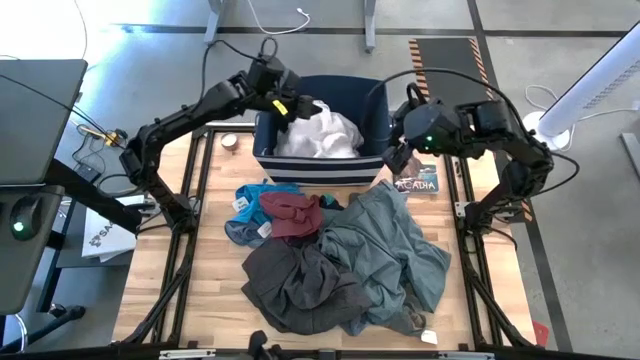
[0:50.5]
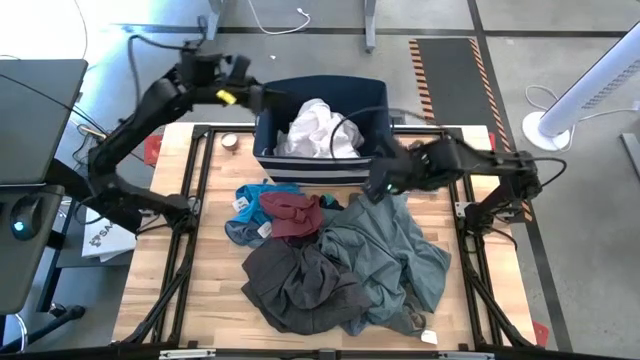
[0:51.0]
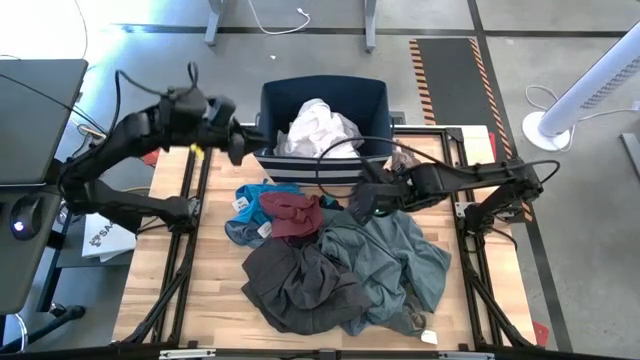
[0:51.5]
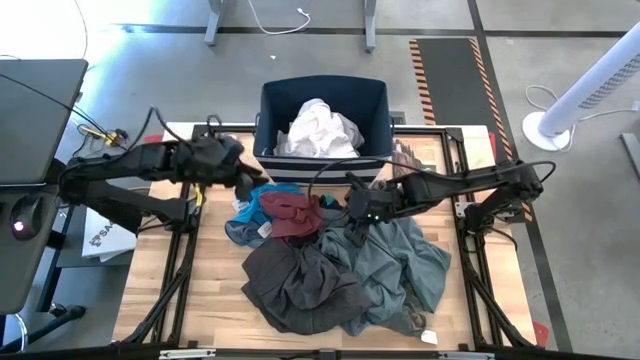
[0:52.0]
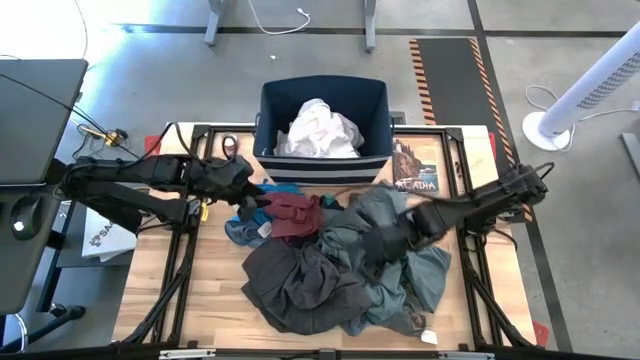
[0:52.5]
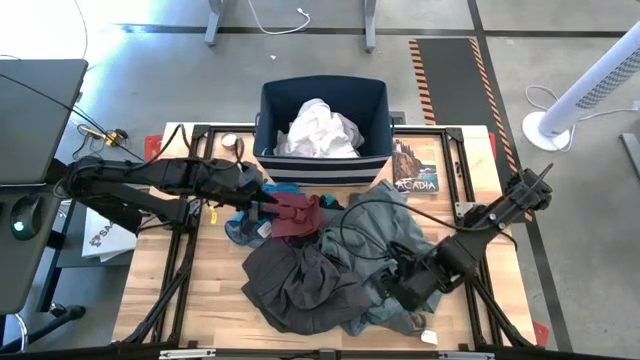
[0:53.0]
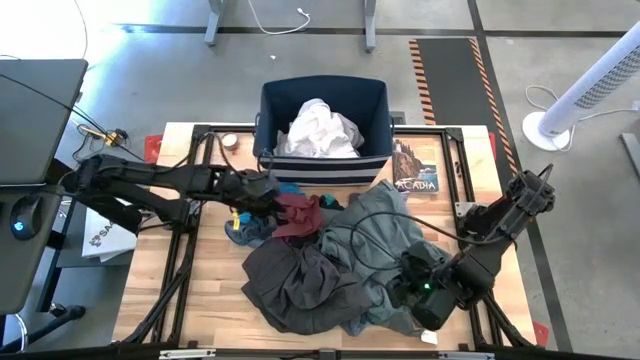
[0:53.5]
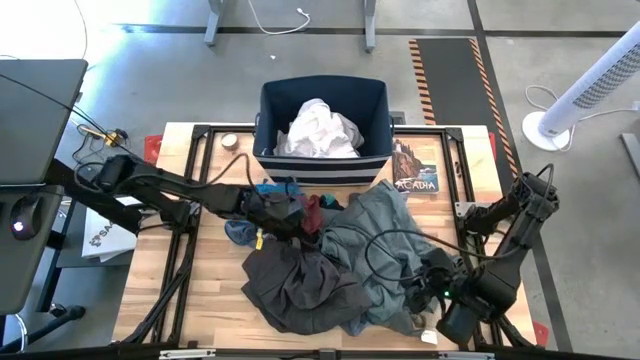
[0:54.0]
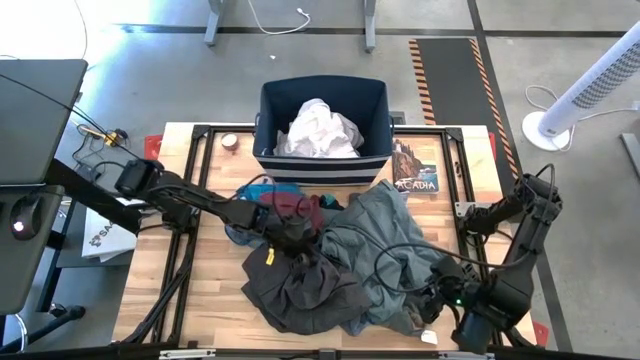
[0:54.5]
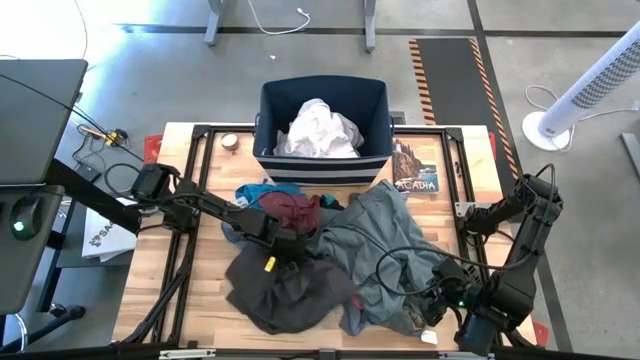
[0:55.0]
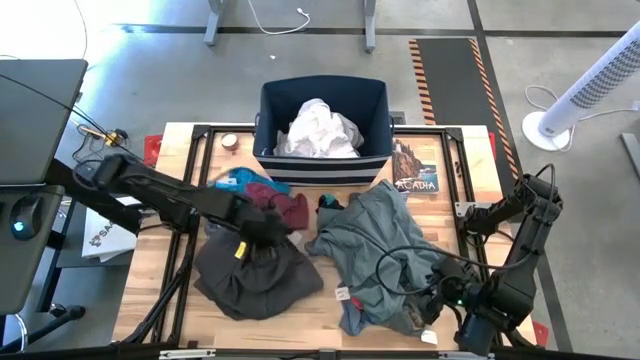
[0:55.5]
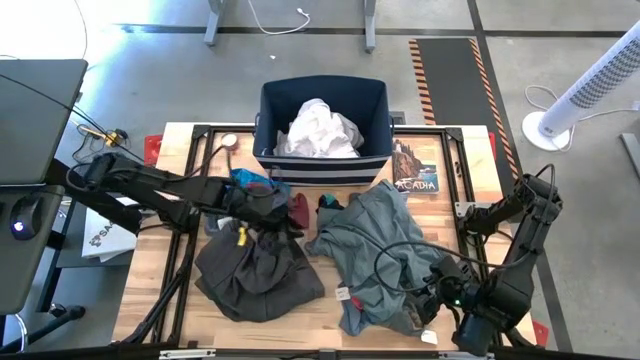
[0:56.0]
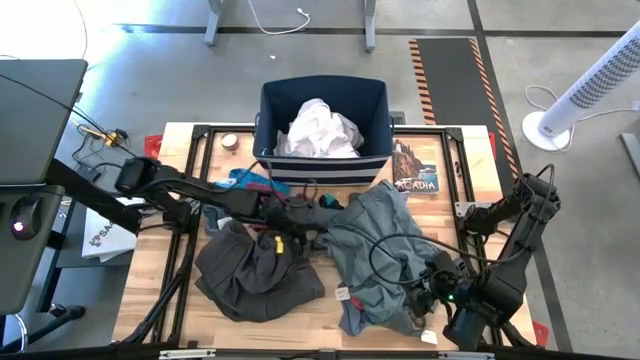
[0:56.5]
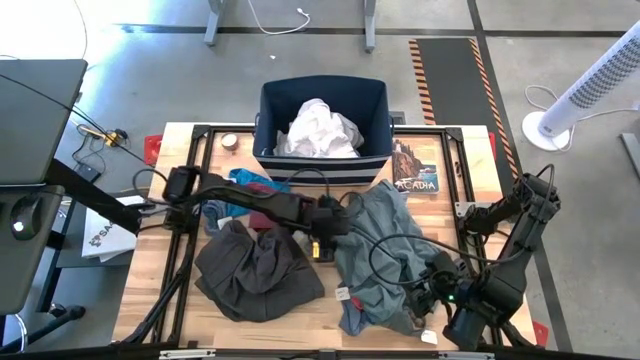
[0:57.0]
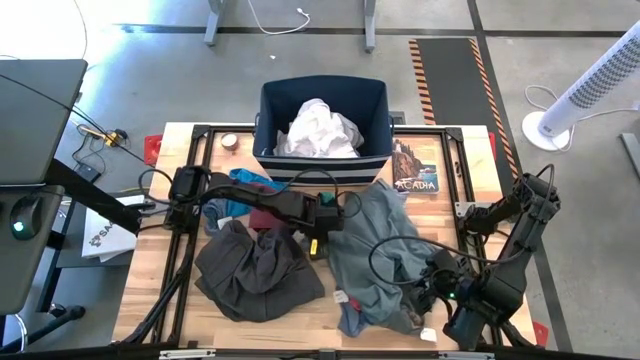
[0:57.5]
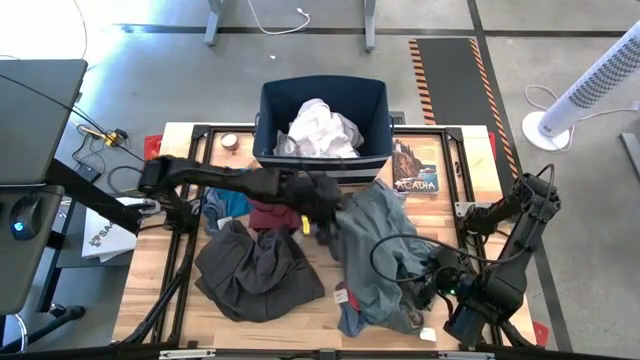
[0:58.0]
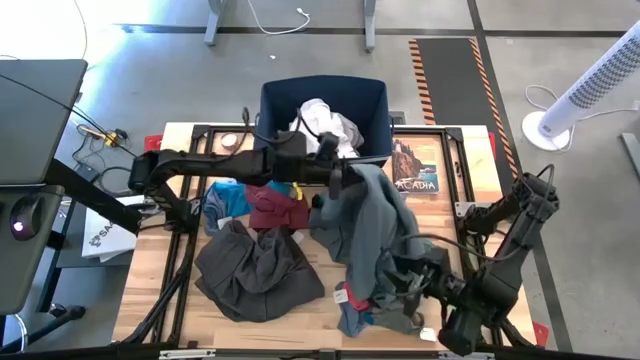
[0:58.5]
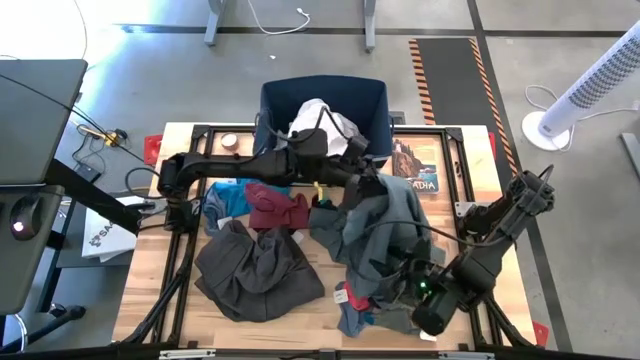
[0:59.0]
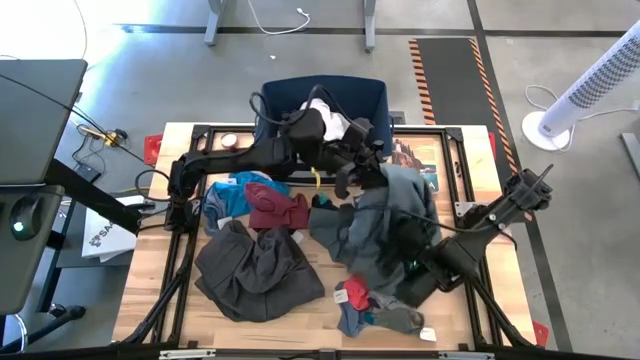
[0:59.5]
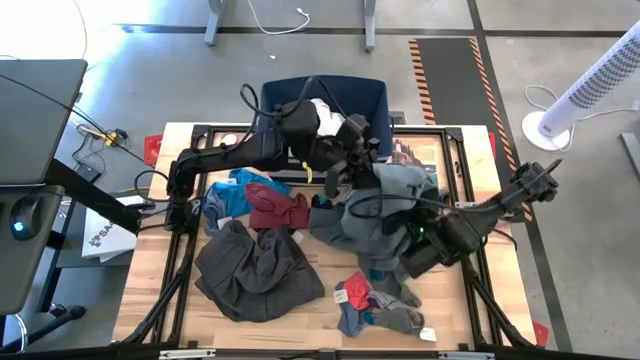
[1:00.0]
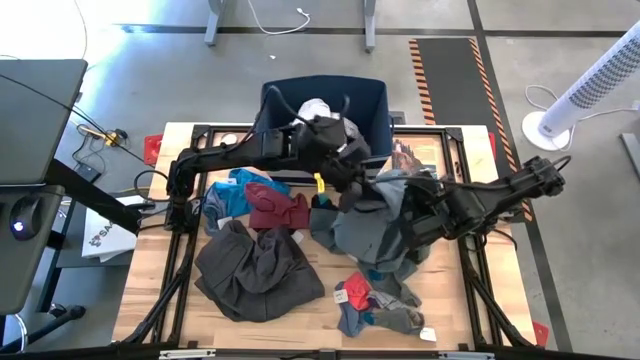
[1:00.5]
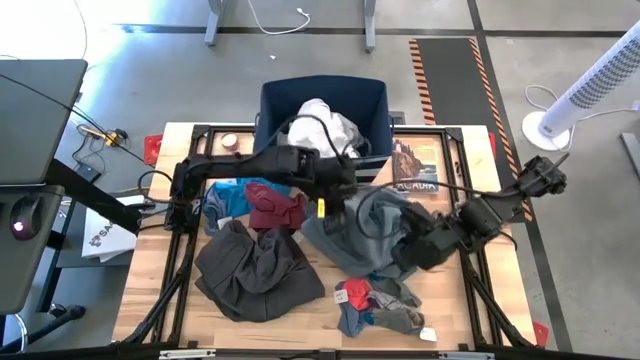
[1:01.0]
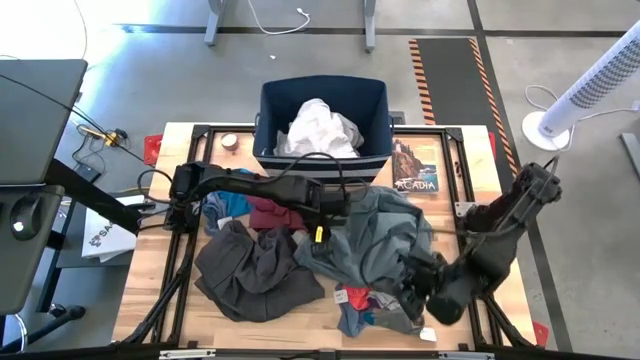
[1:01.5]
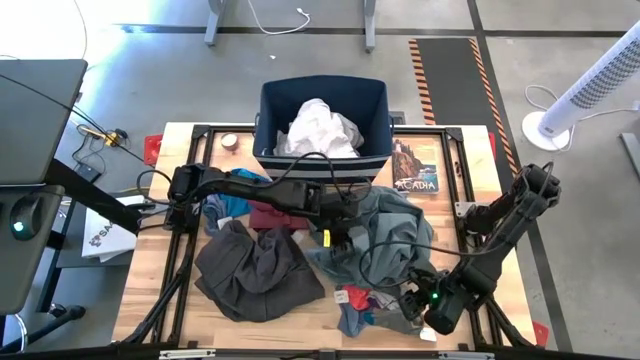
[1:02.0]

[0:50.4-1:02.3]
Task: Sort clothes
Put the grey sock into the blue laundry bin

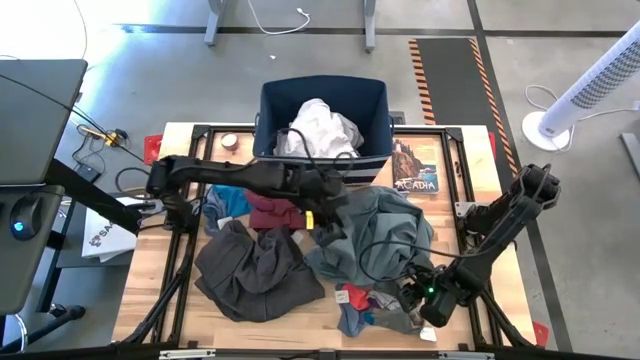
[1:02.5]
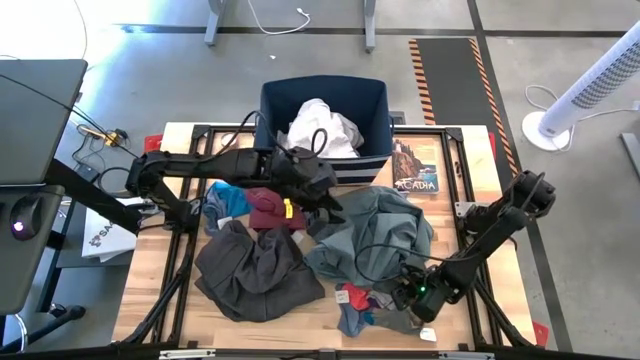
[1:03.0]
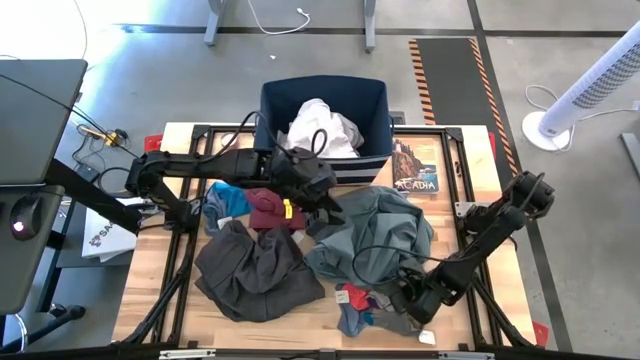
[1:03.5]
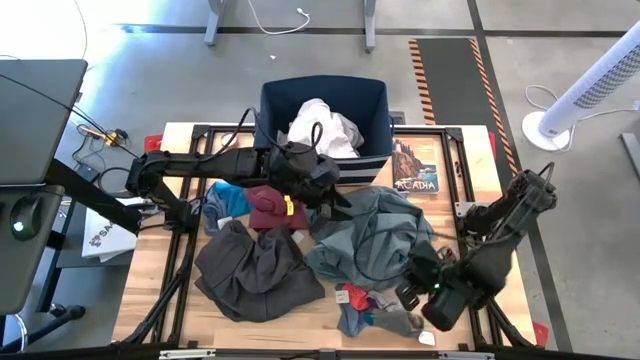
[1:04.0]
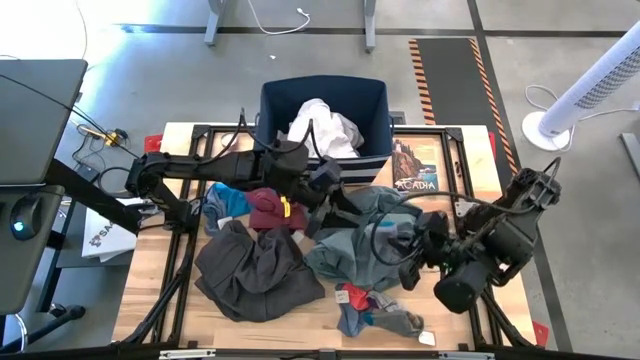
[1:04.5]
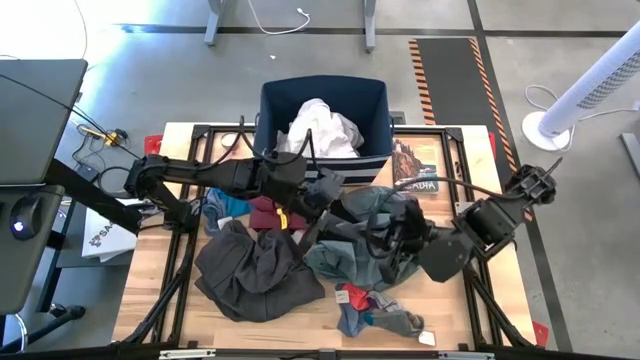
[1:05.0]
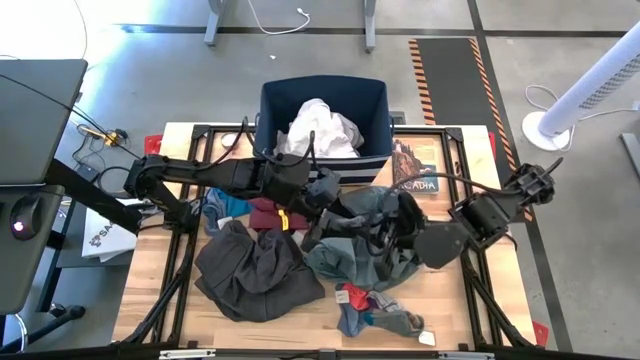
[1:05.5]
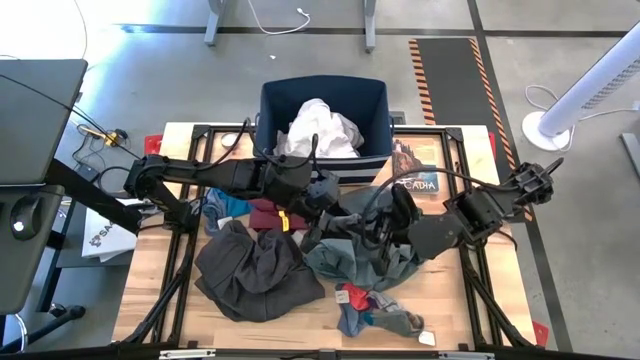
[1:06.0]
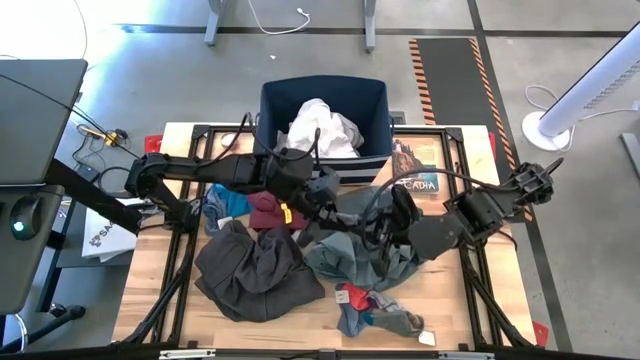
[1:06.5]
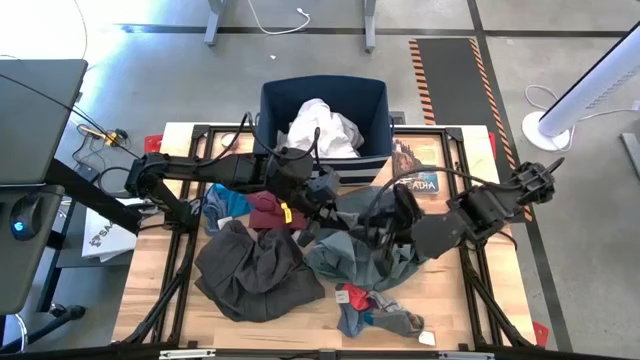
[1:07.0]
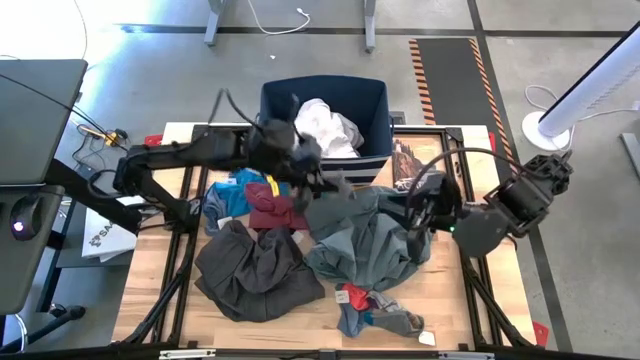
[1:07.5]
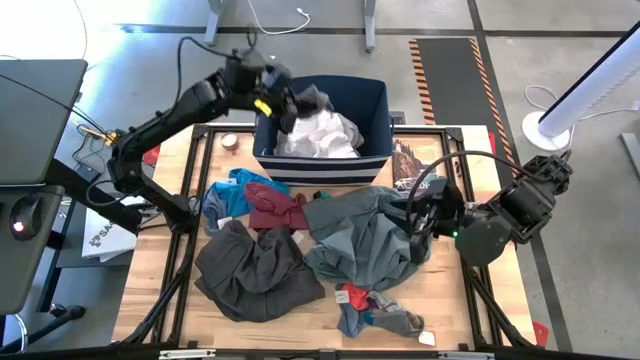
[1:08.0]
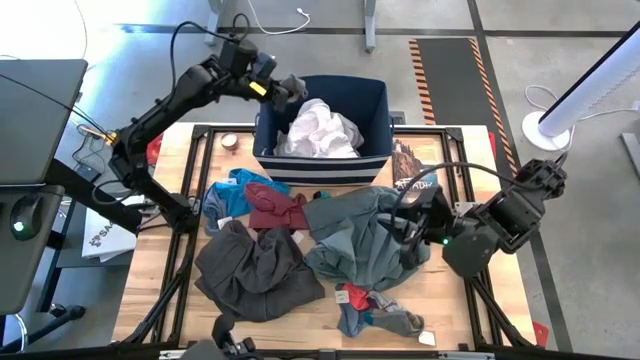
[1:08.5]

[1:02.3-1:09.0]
Put the grey sock into the blue laundry bin

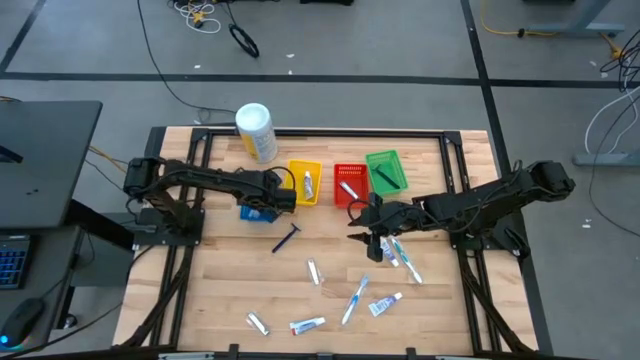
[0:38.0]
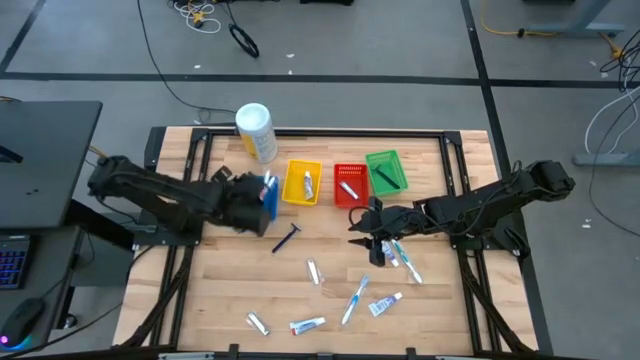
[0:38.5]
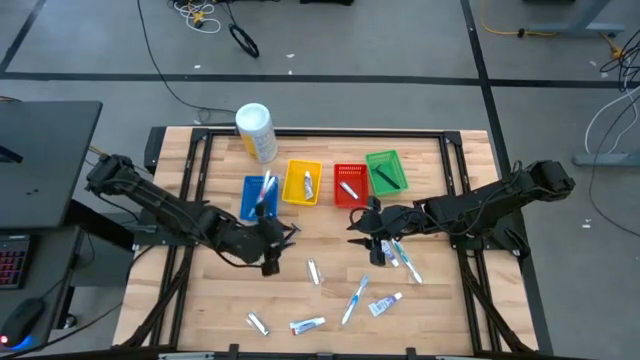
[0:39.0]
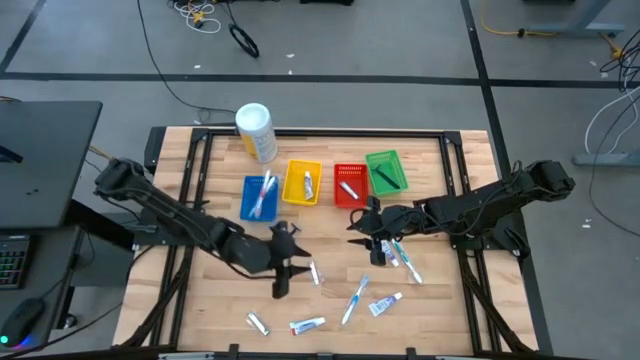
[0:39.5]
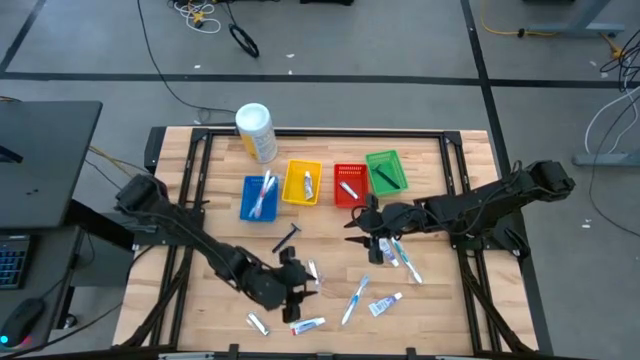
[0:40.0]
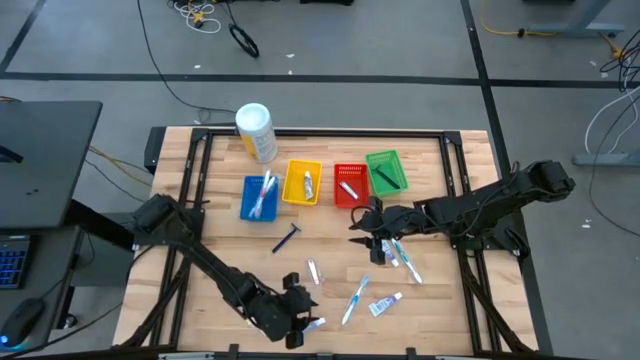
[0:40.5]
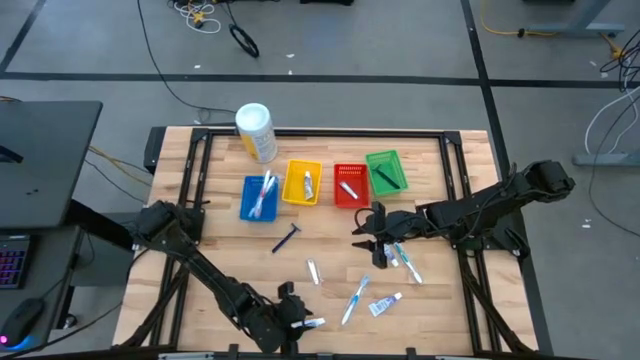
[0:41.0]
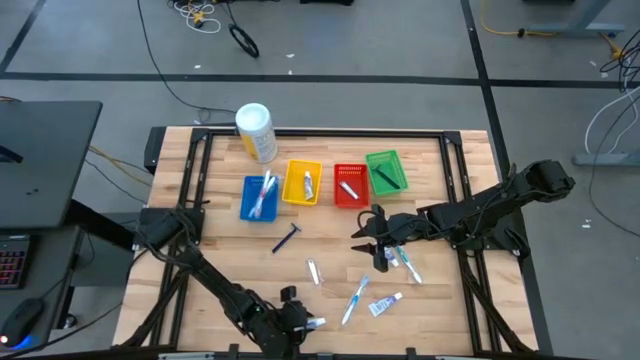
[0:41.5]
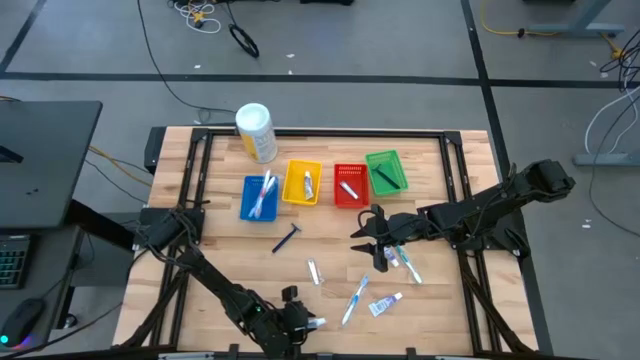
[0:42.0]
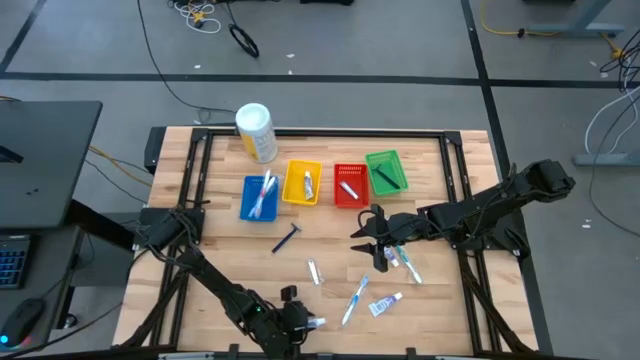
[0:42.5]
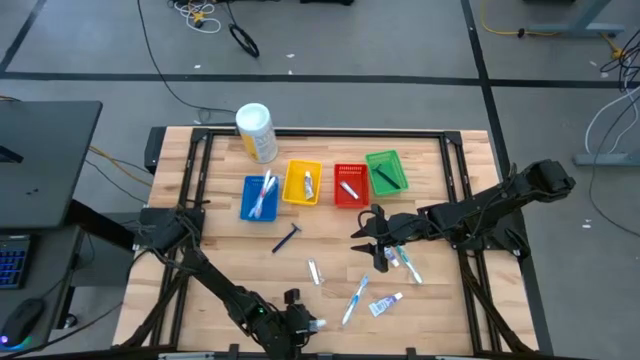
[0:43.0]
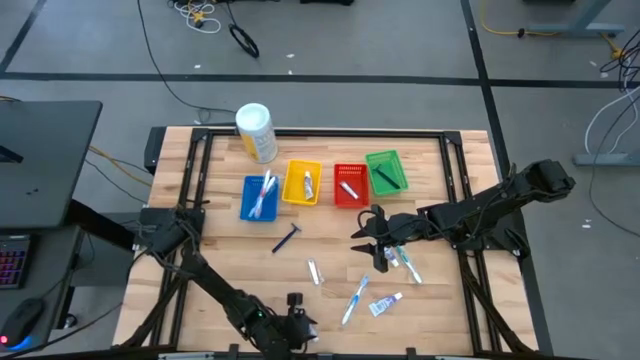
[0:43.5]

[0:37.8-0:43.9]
Task: Pick & Place Travel size toiletries
Put the white toothpaste into the yellow bin
